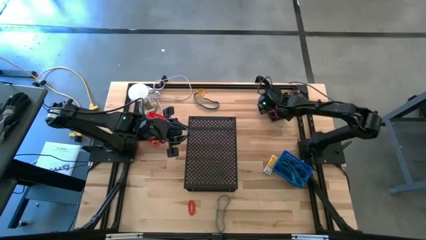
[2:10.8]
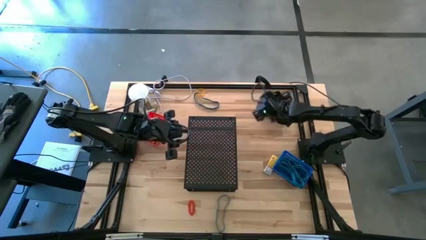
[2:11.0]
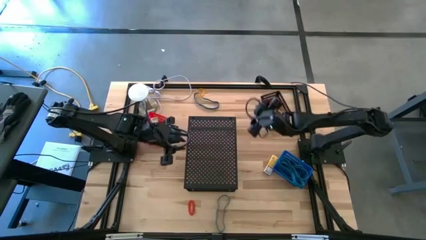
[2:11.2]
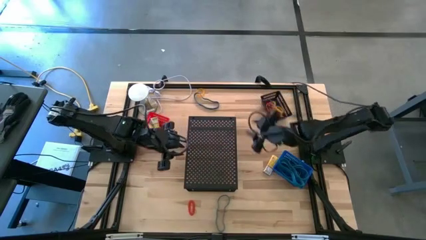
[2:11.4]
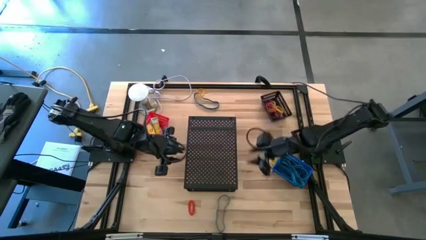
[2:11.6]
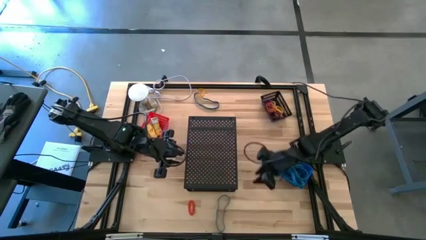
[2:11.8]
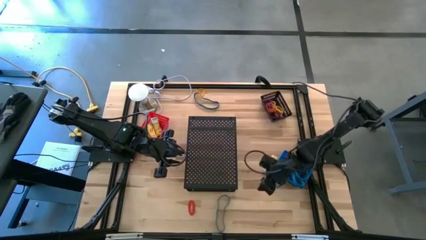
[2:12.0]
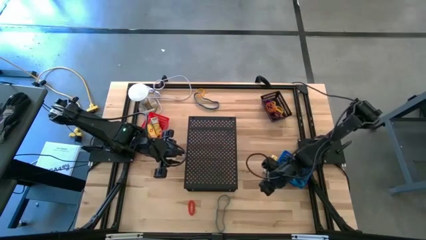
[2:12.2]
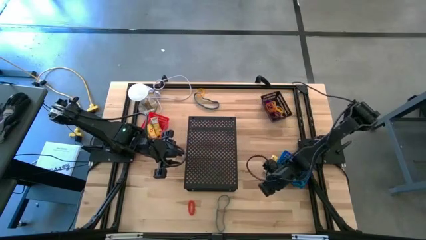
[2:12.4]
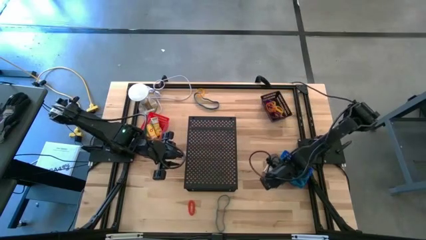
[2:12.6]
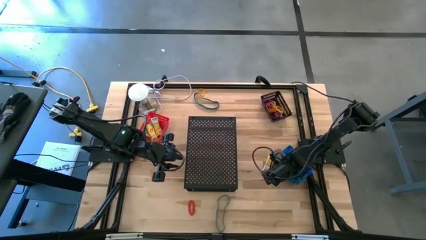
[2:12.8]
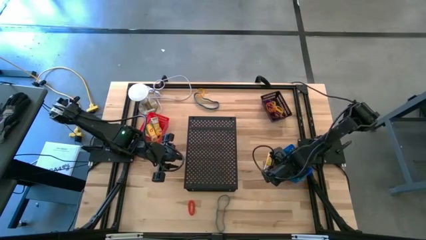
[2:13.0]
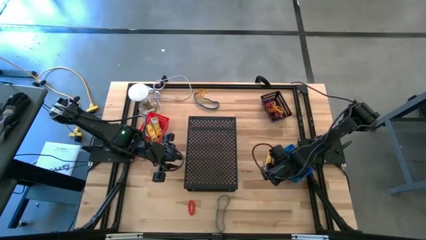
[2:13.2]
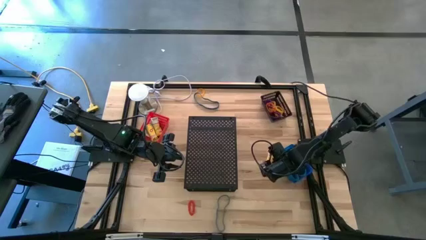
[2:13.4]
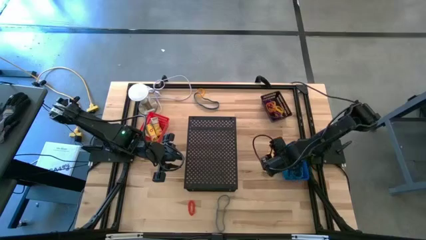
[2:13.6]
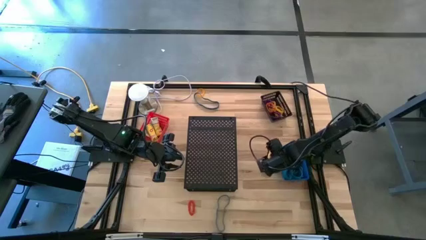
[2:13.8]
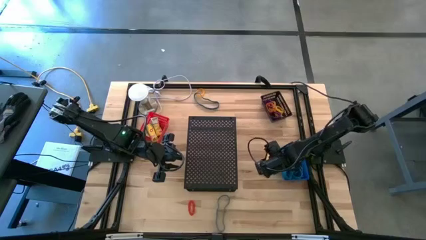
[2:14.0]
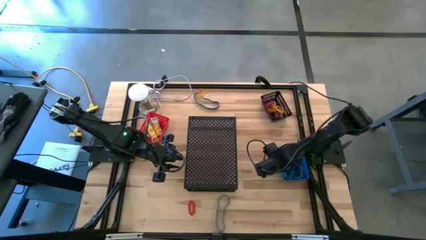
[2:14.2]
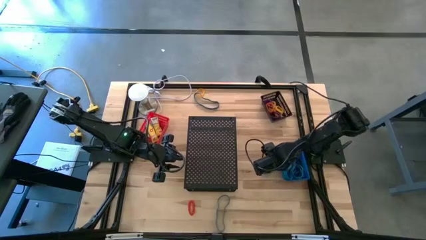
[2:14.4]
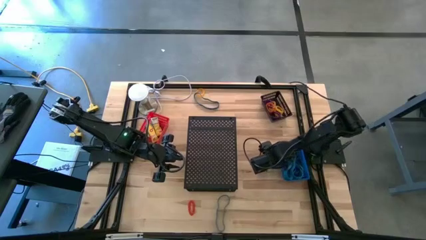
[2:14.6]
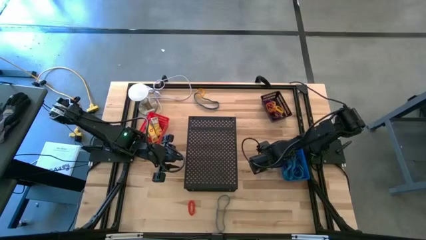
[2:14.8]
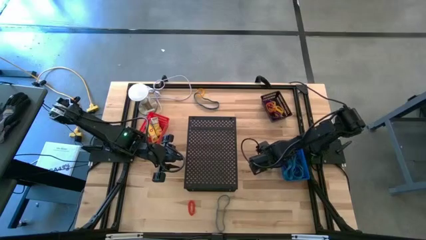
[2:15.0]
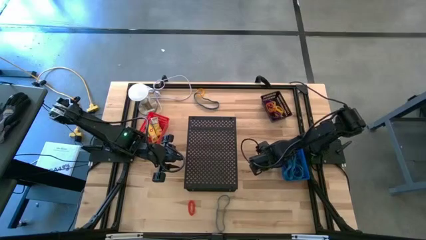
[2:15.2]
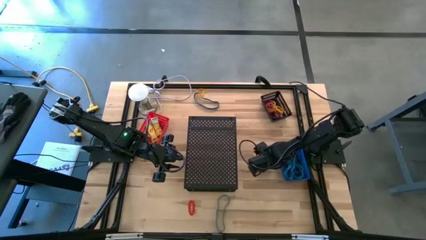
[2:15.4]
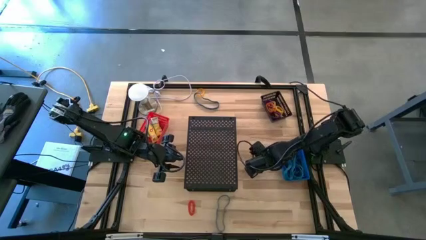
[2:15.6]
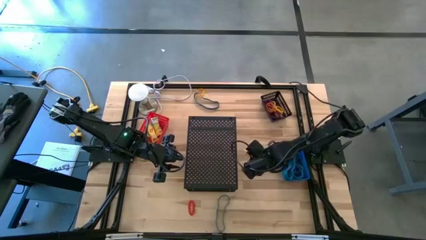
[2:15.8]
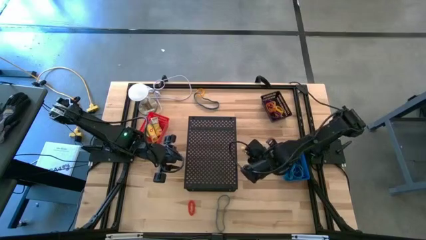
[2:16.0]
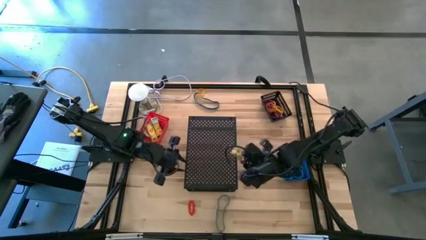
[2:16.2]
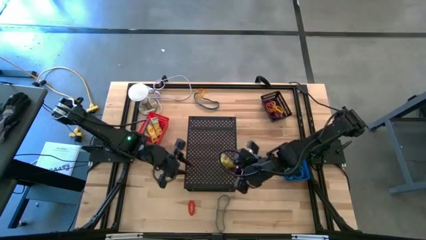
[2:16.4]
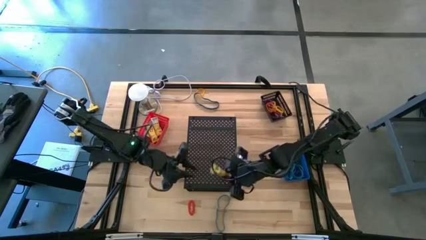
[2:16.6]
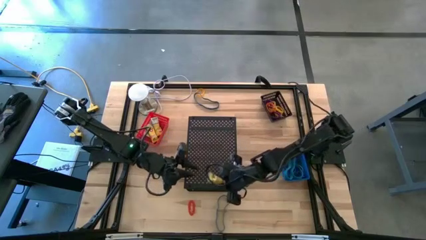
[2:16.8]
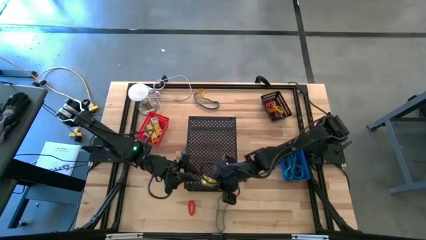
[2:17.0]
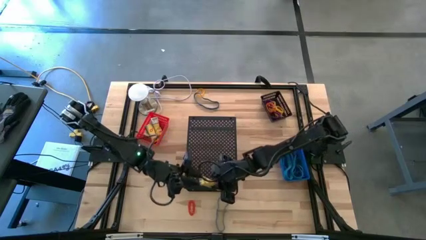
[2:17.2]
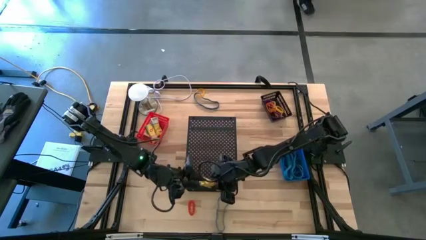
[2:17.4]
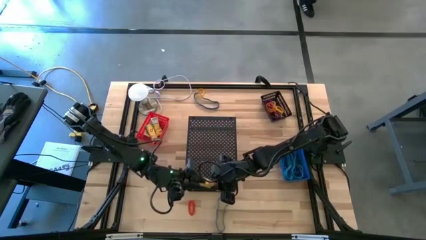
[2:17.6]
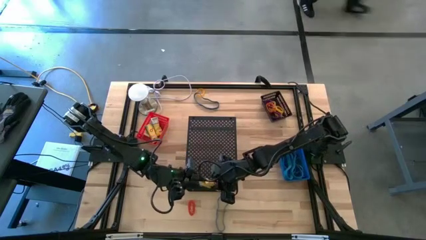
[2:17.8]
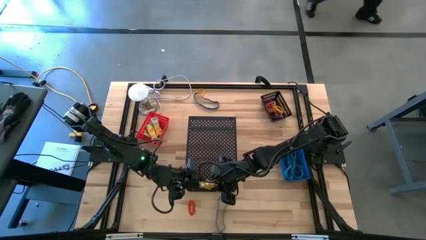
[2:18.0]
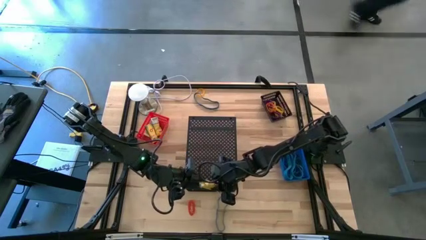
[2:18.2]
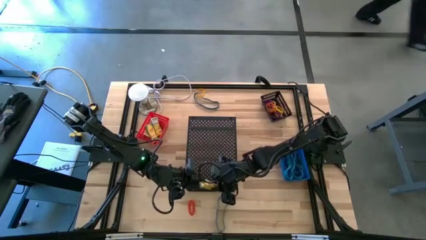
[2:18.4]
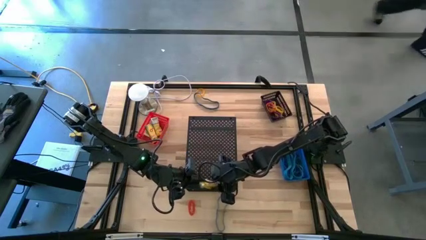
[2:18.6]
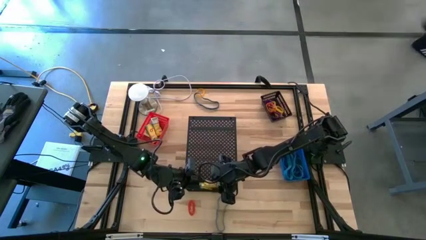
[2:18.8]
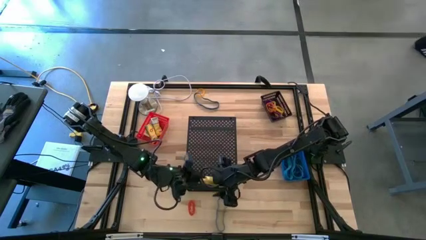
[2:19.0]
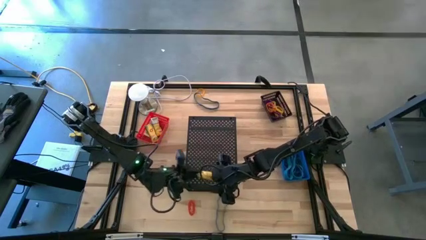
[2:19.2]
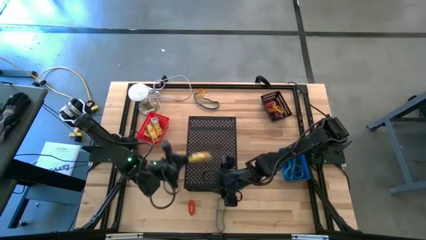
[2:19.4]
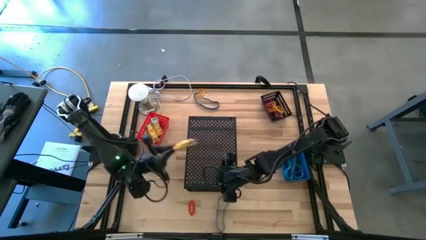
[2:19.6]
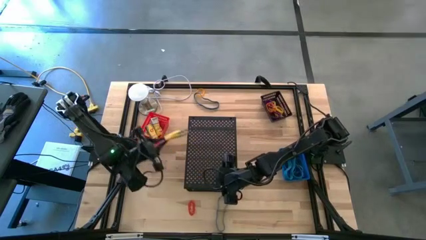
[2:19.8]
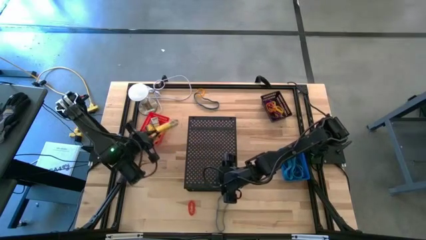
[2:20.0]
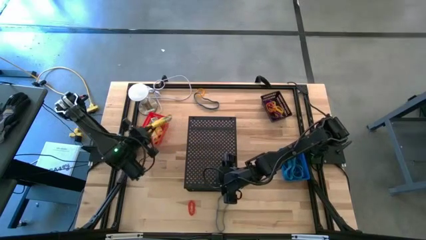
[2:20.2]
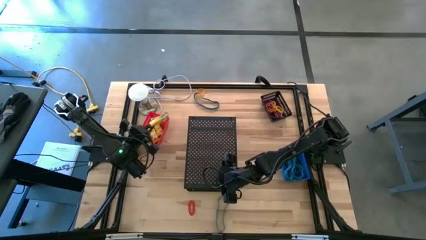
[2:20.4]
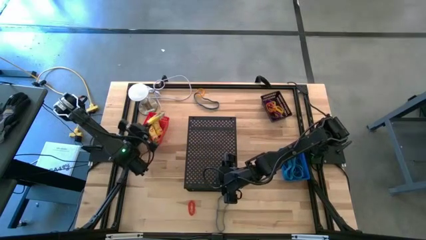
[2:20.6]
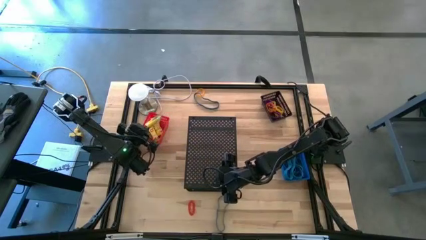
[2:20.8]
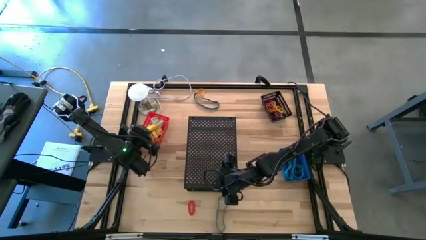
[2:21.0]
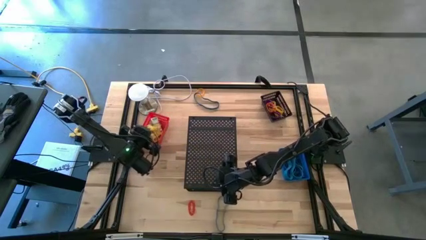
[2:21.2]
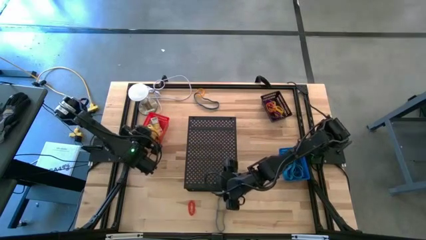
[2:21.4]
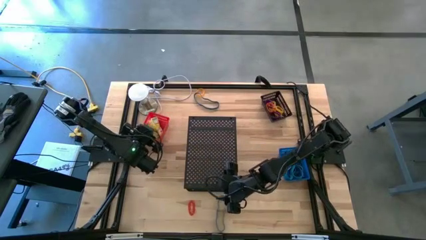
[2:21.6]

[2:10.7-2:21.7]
Task: Pick & Place Office Desk Supplies
Put the yellow crayon box into the red bin

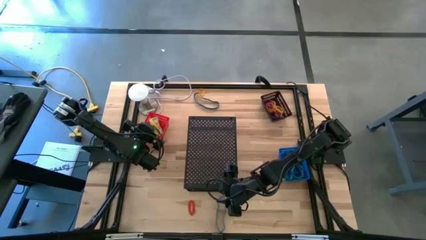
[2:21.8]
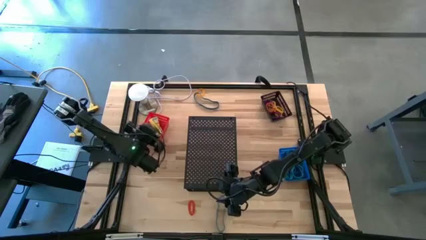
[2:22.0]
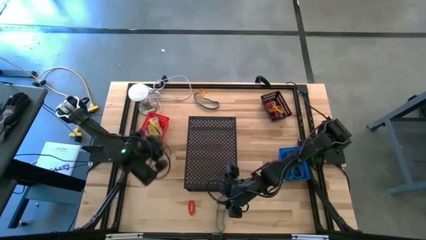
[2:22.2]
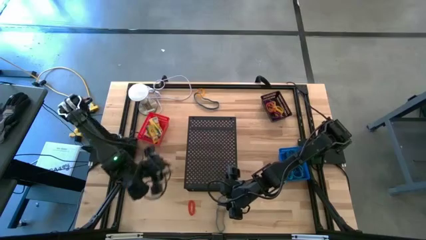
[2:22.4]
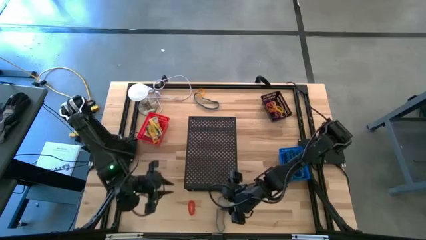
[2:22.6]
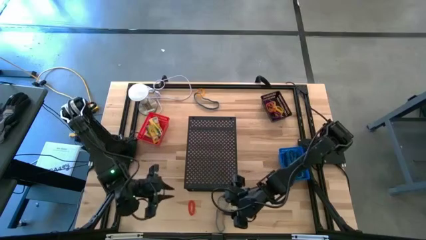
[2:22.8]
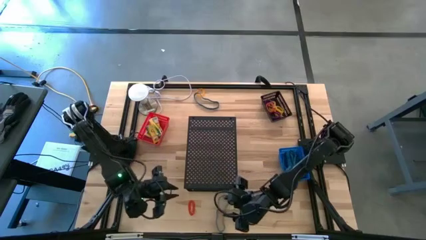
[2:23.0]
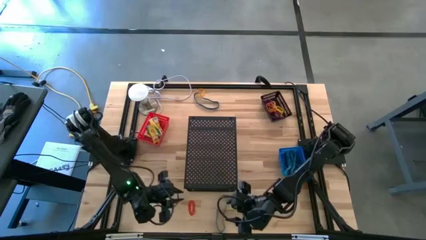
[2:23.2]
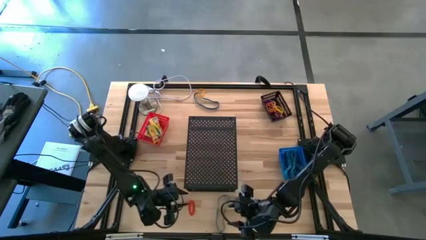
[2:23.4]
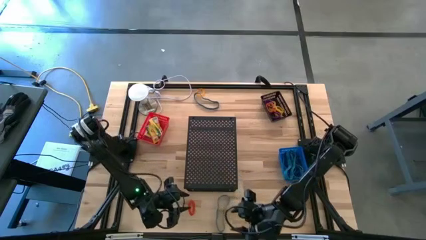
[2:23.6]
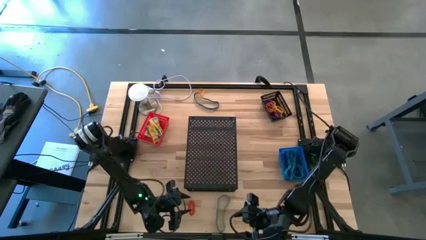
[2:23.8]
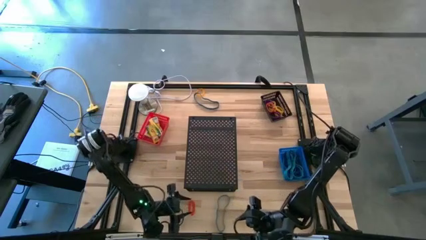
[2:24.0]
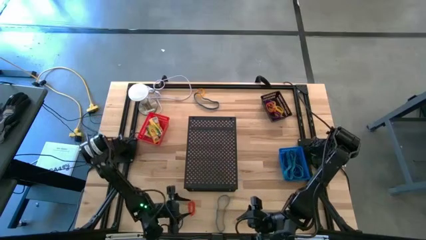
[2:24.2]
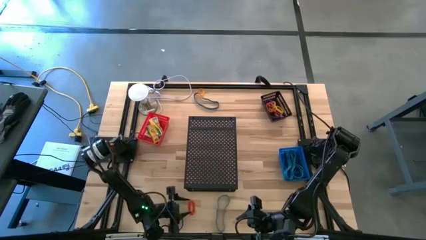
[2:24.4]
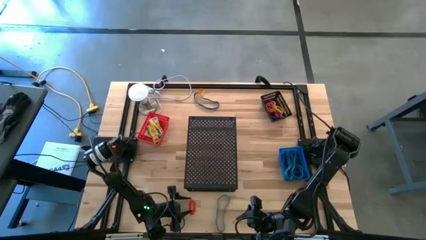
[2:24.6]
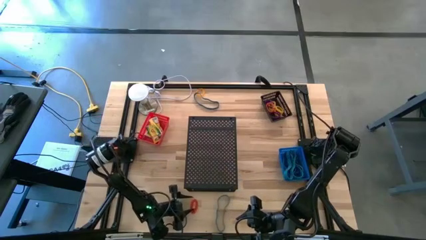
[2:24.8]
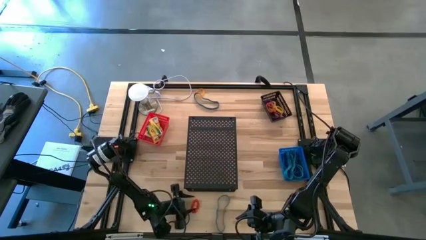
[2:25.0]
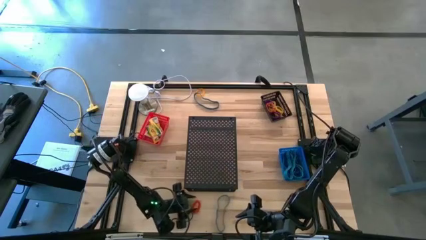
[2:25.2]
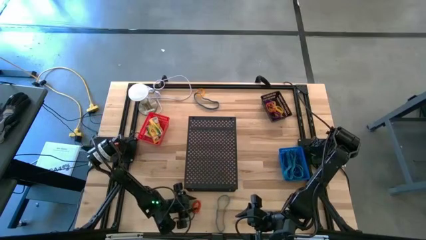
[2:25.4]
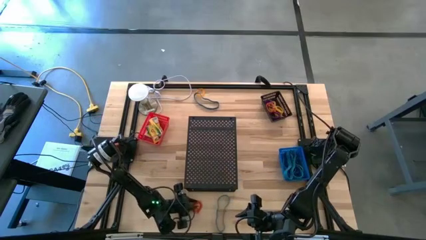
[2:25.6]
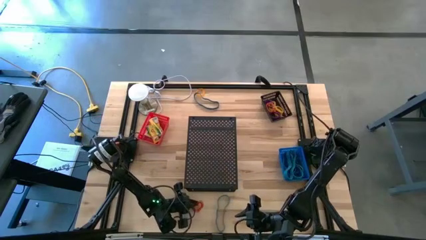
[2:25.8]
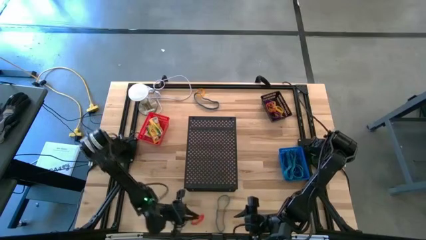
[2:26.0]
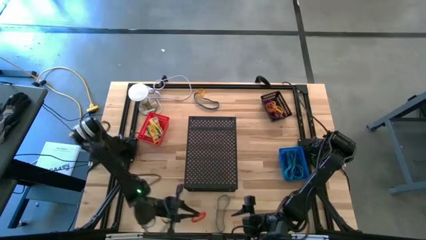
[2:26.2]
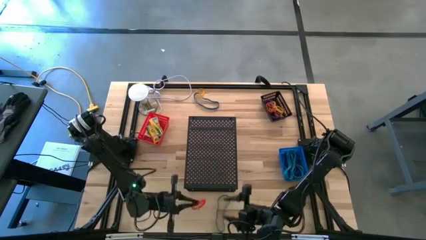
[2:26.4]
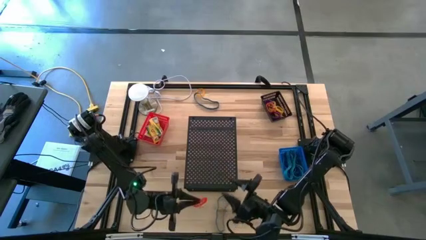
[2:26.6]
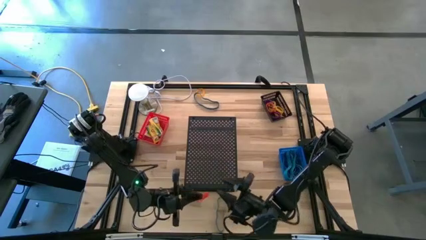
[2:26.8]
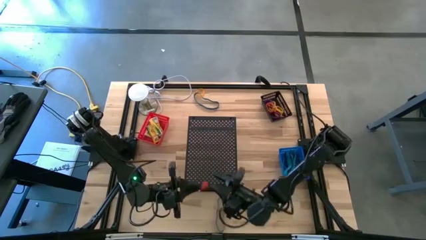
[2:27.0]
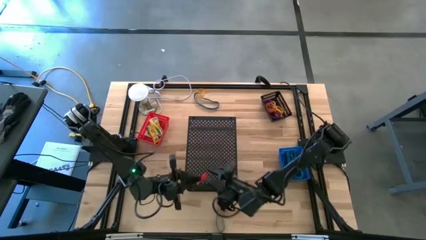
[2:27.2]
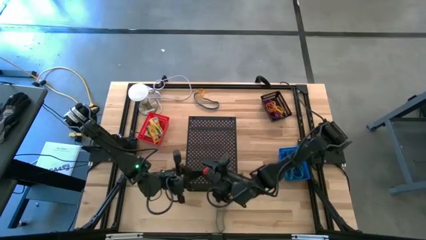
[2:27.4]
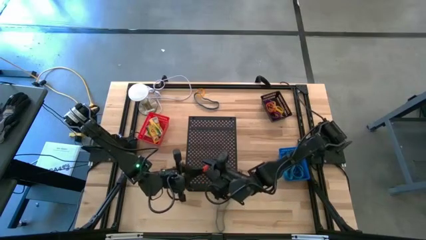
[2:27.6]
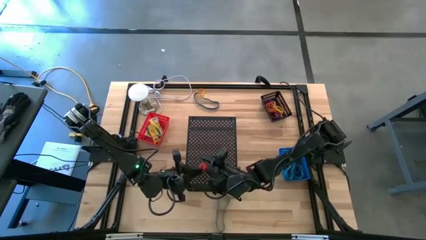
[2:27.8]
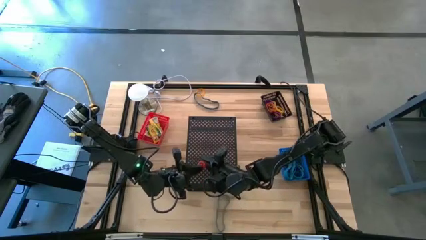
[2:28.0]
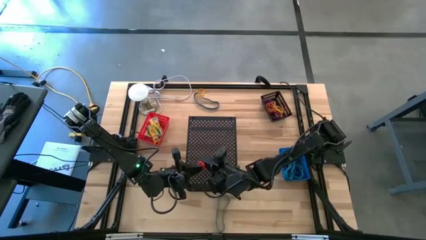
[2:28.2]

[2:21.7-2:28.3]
Put the orange spring keychain into the black bin
